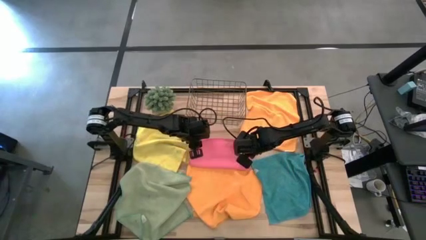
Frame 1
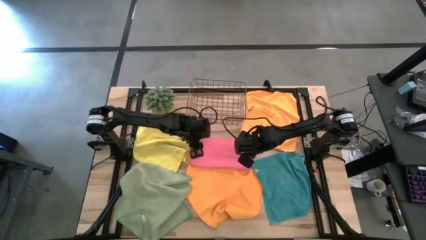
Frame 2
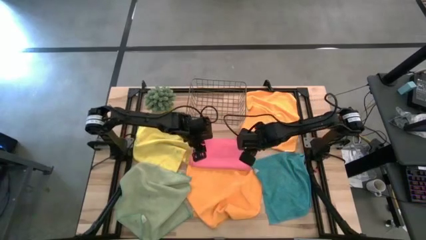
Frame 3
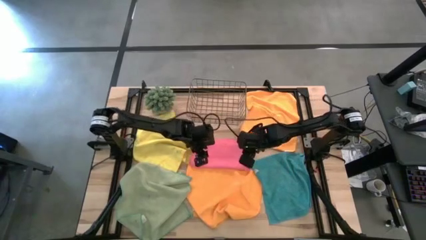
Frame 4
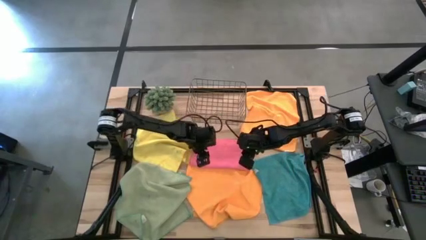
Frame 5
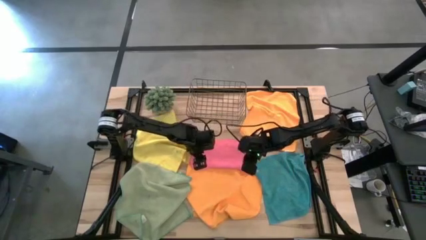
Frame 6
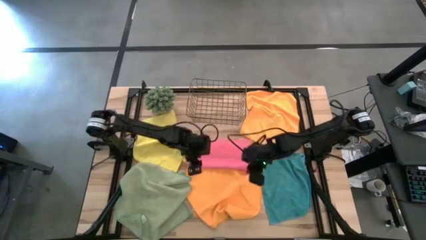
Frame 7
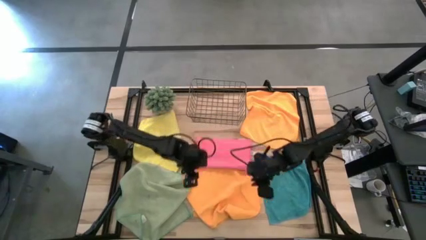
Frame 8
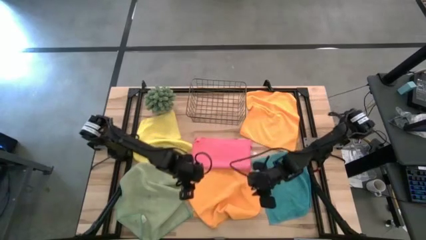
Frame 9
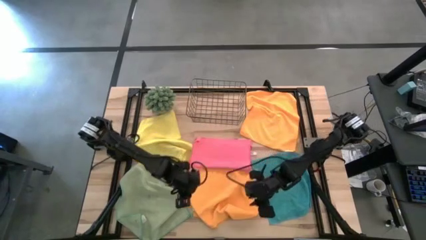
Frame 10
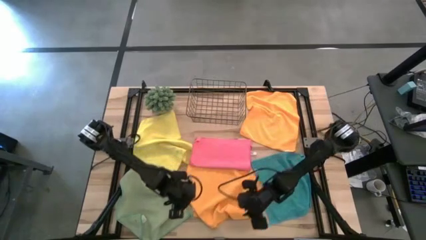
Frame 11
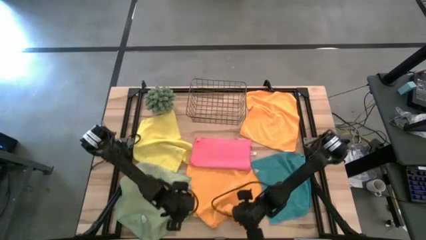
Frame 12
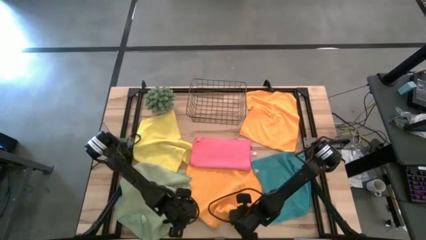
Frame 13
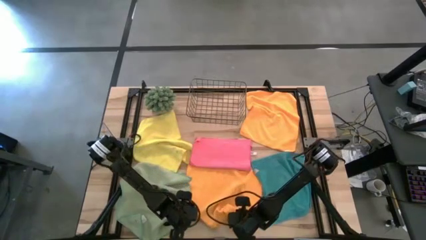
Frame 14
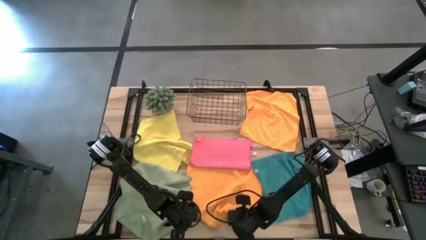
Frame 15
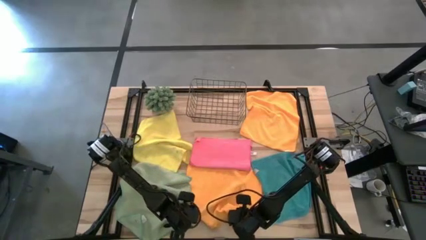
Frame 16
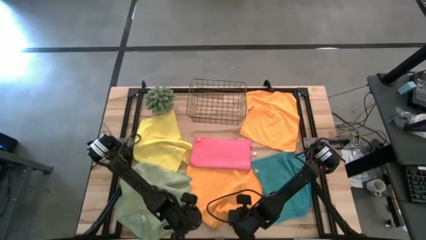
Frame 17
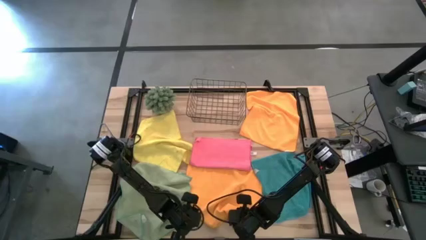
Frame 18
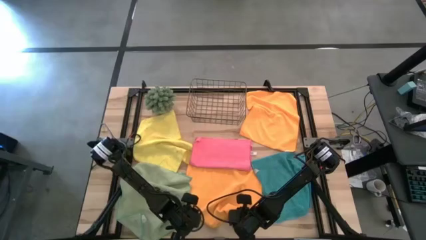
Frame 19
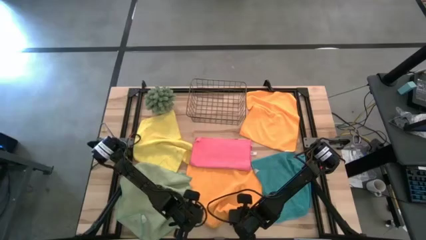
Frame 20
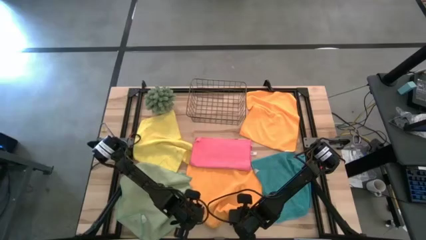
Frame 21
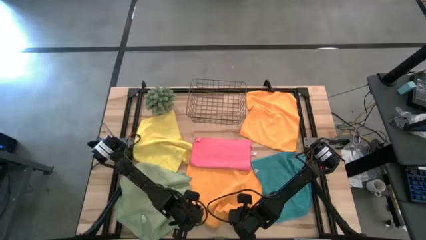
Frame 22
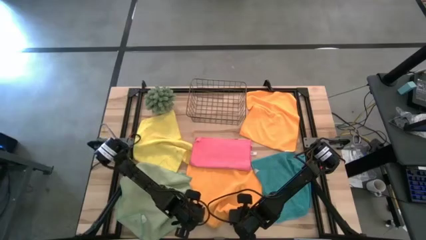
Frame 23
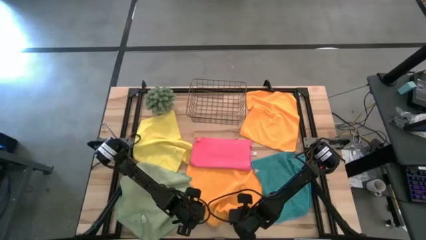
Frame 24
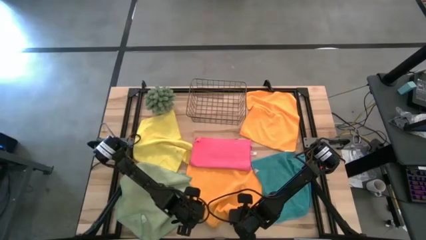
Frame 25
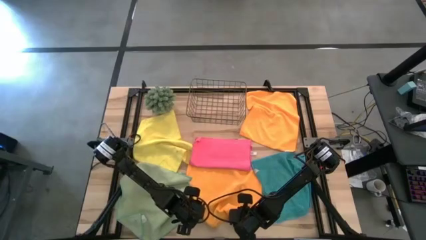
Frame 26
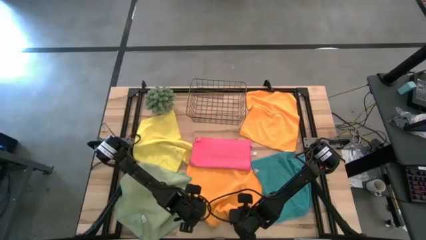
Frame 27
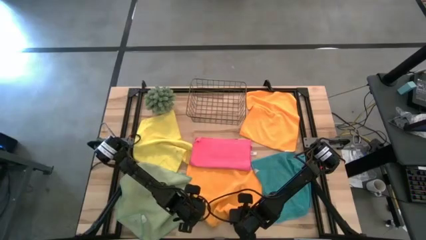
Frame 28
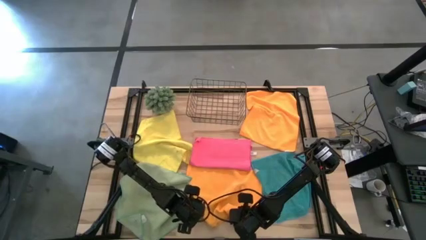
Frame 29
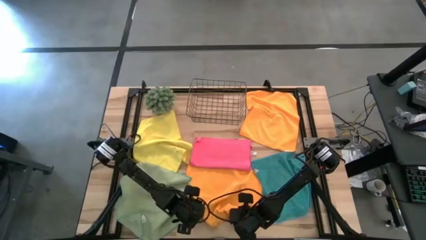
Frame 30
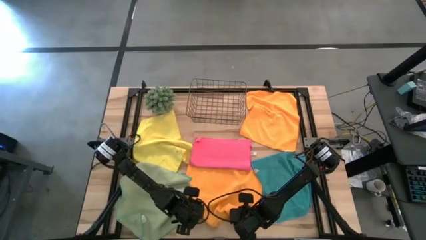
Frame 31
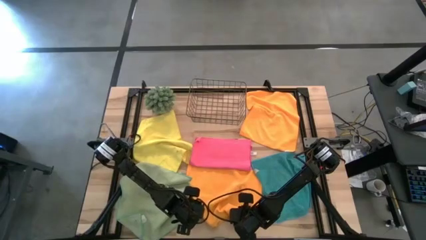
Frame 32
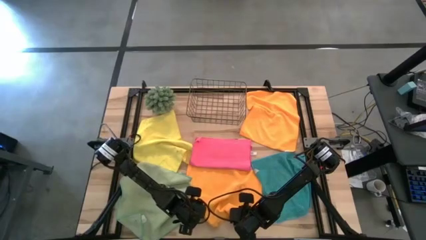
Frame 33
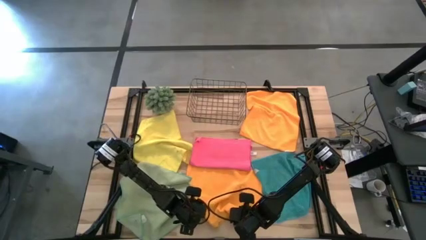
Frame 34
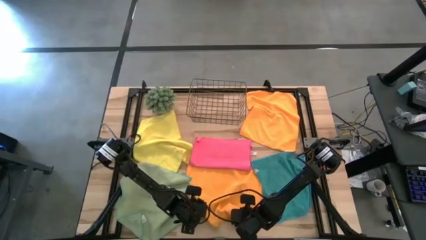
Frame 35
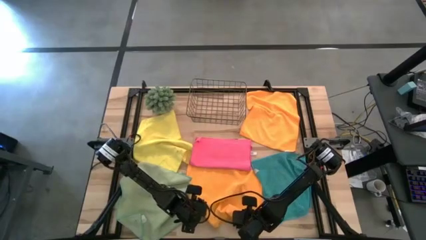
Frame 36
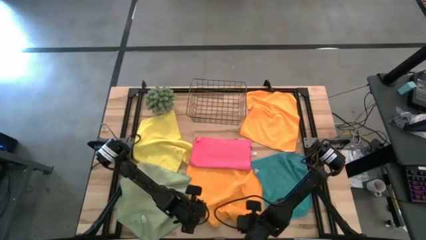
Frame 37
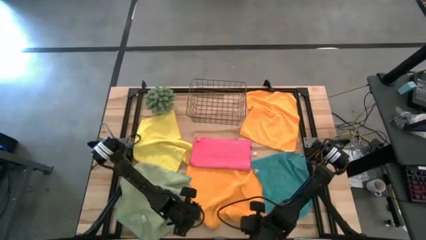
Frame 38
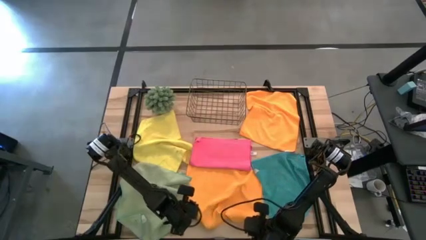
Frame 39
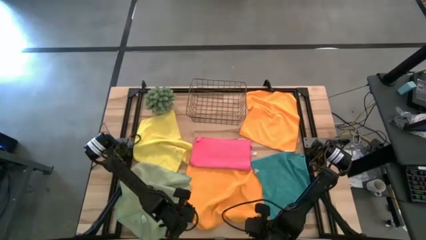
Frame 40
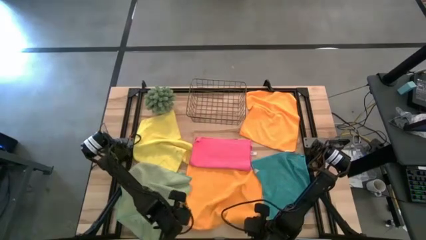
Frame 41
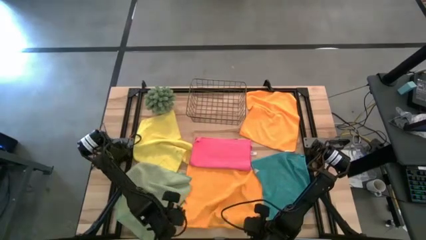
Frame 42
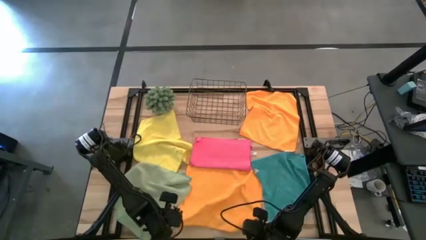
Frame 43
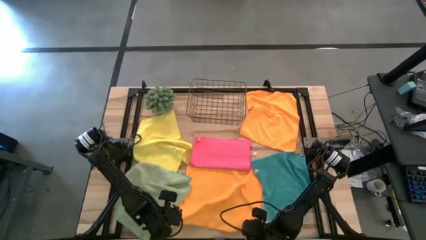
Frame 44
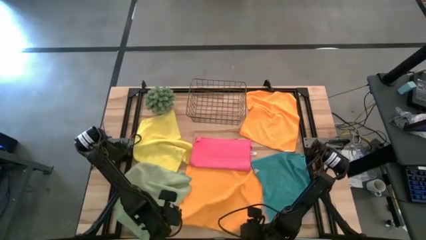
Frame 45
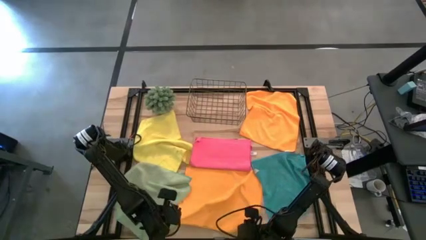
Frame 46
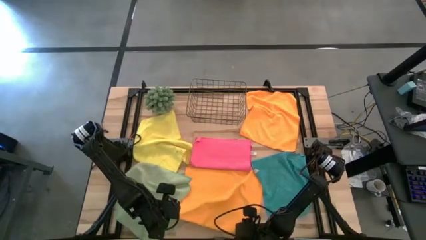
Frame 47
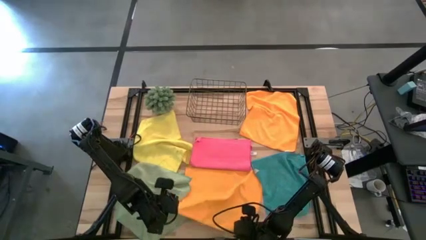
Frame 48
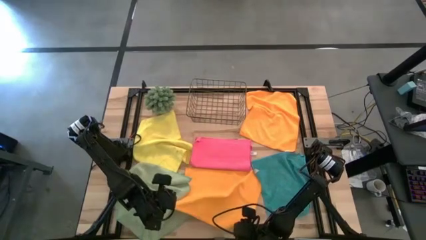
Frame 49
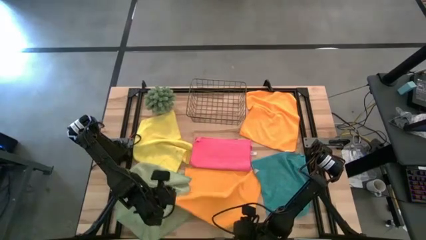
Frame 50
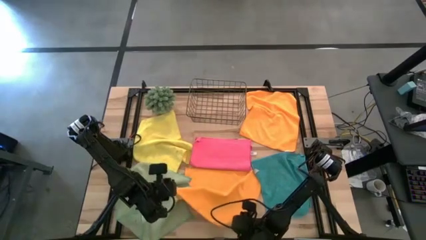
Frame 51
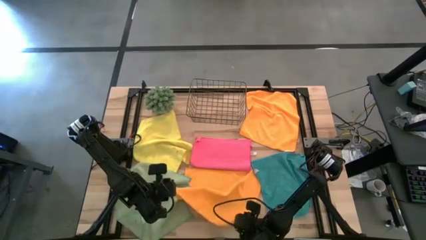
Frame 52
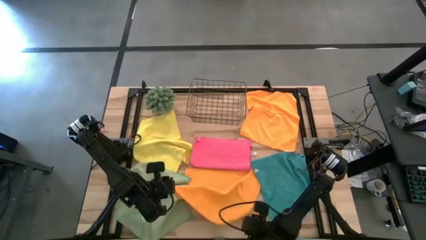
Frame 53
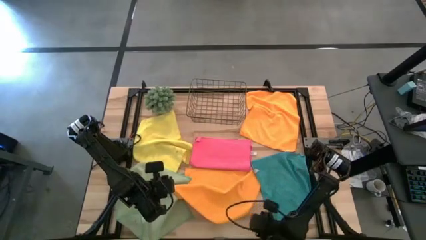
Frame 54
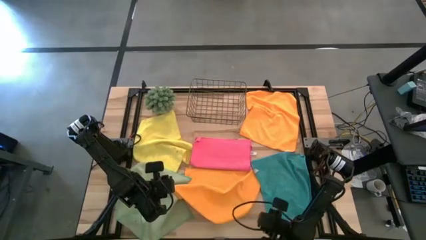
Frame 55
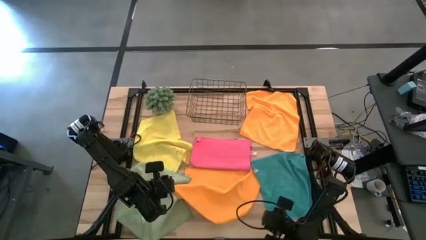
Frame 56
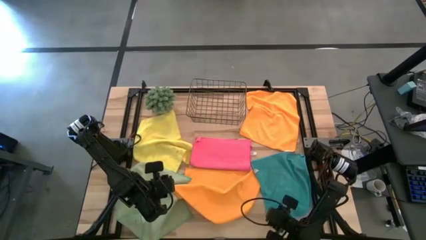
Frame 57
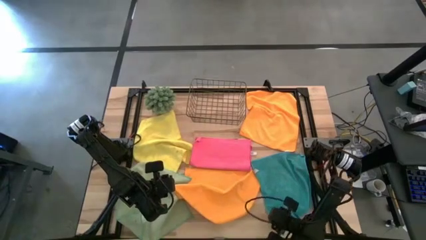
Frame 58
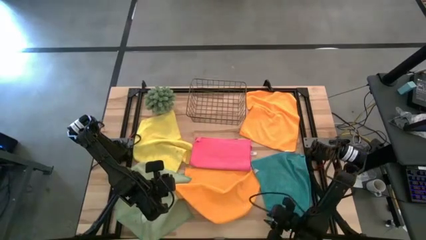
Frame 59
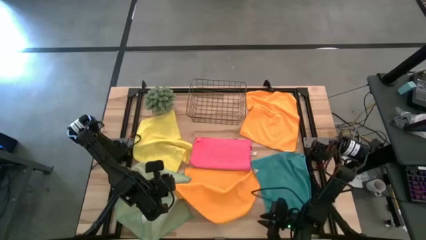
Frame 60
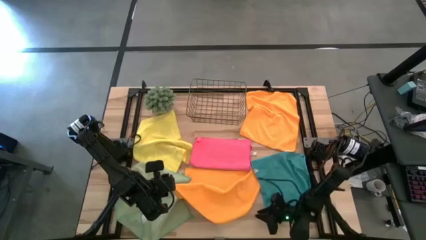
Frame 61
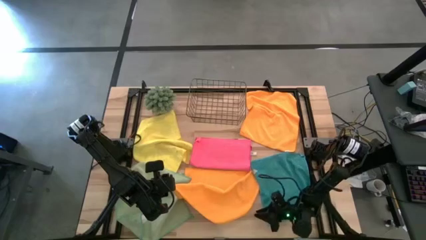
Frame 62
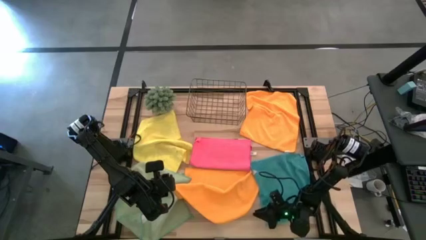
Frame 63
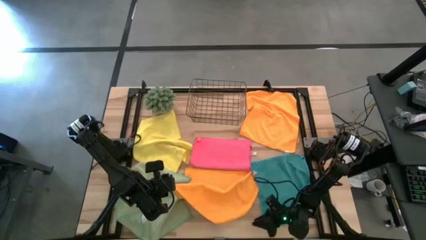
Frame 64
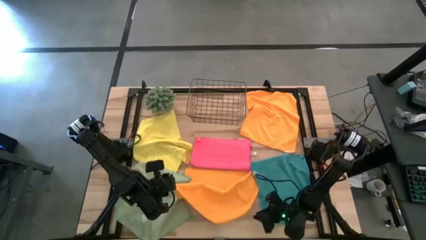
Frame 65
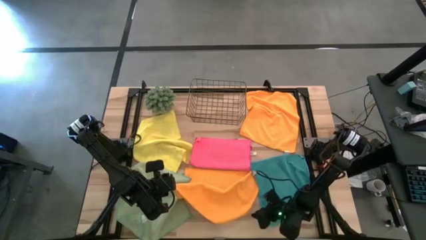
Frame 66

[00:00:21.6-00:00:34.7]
Task: Fold microfiber towels
Fold the bottom orange microfiber towel
